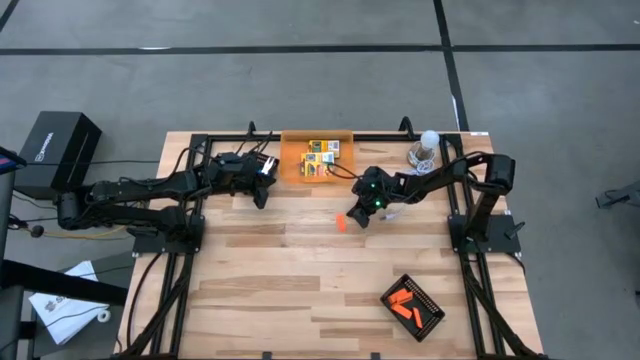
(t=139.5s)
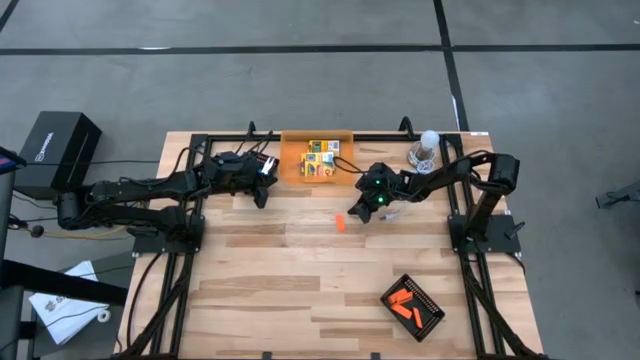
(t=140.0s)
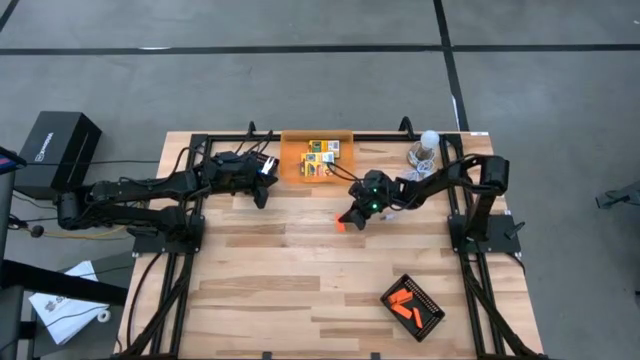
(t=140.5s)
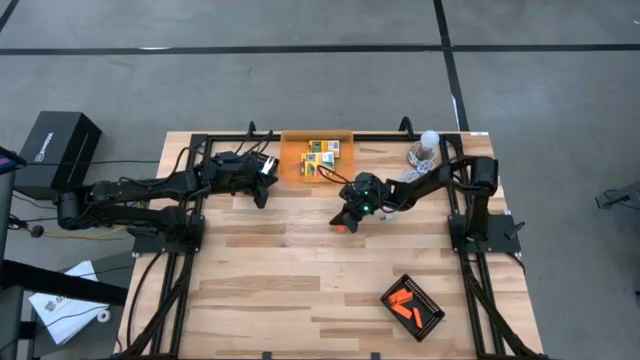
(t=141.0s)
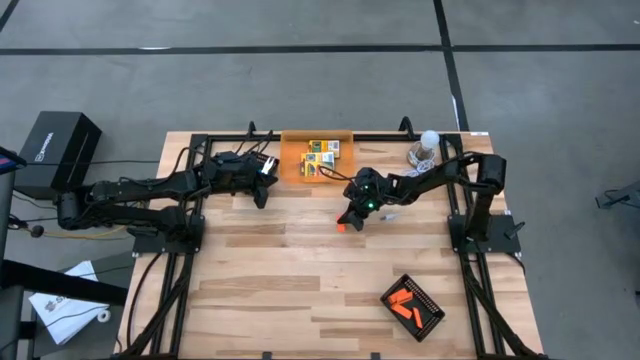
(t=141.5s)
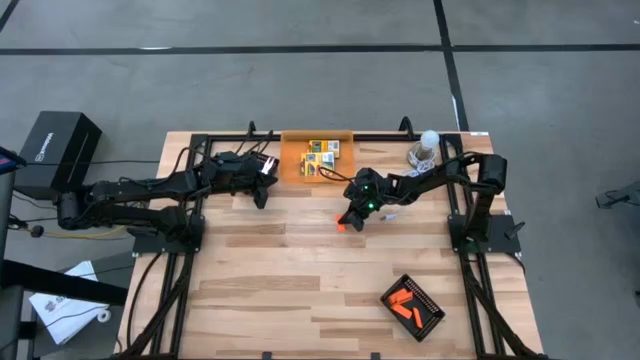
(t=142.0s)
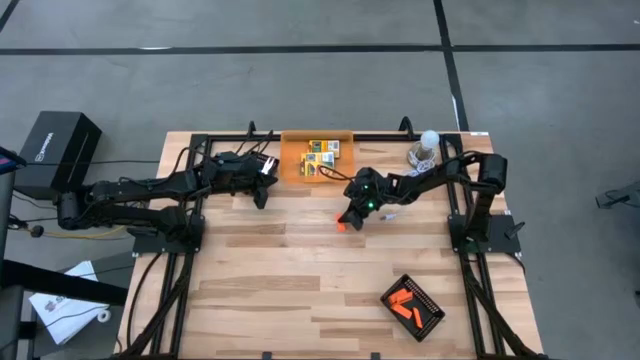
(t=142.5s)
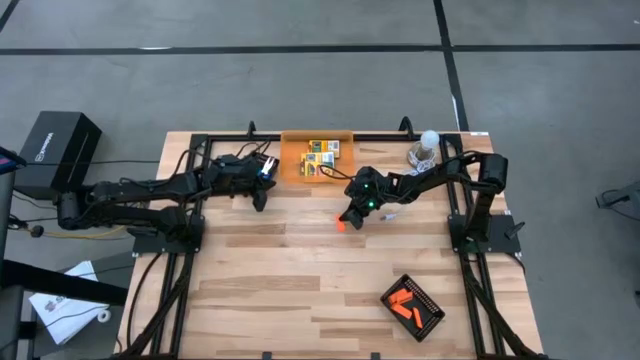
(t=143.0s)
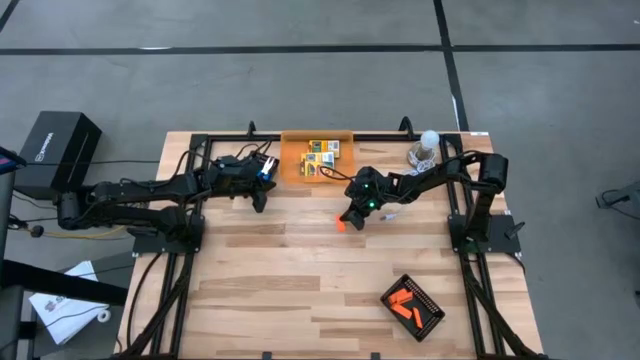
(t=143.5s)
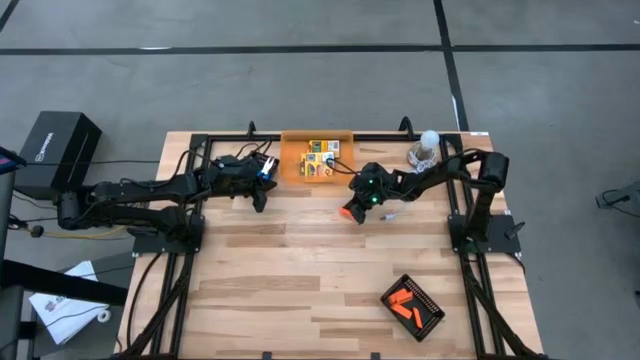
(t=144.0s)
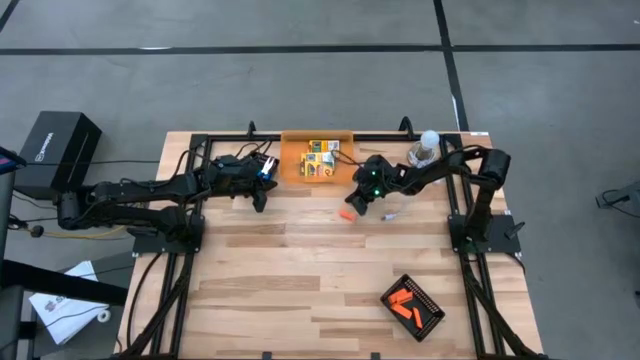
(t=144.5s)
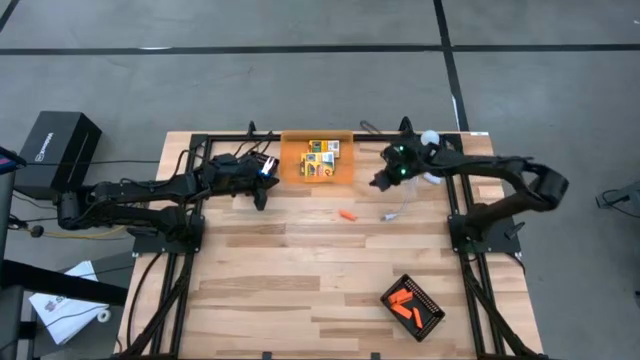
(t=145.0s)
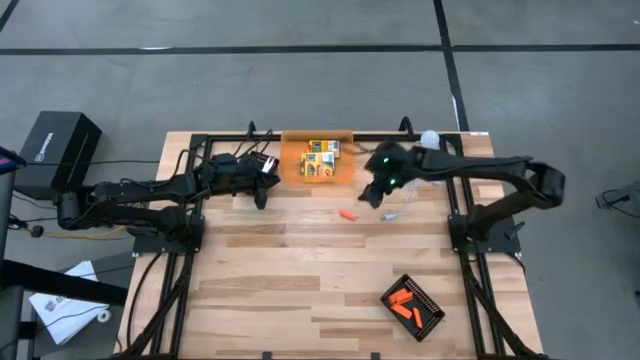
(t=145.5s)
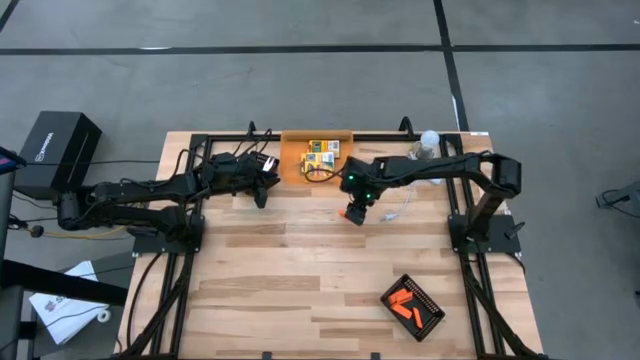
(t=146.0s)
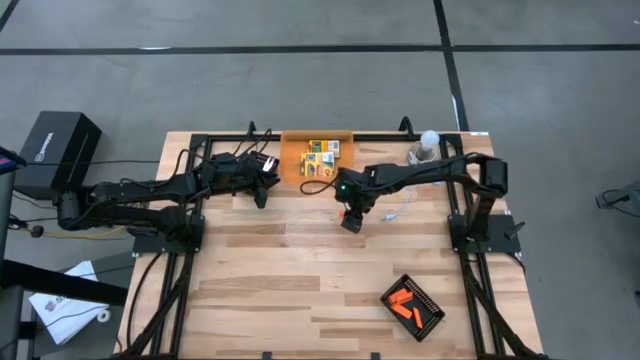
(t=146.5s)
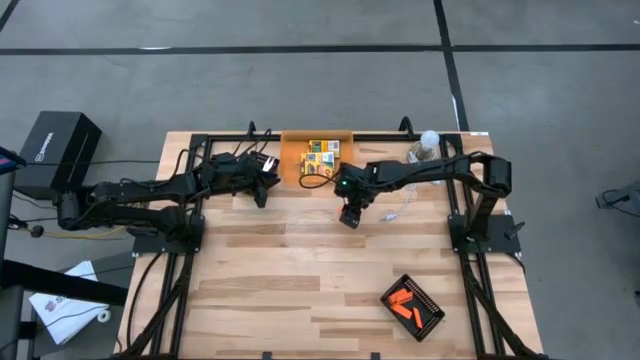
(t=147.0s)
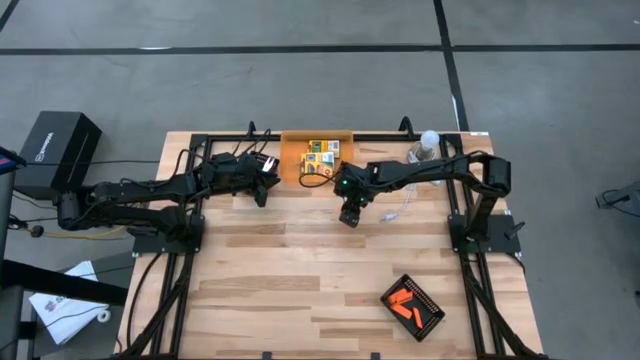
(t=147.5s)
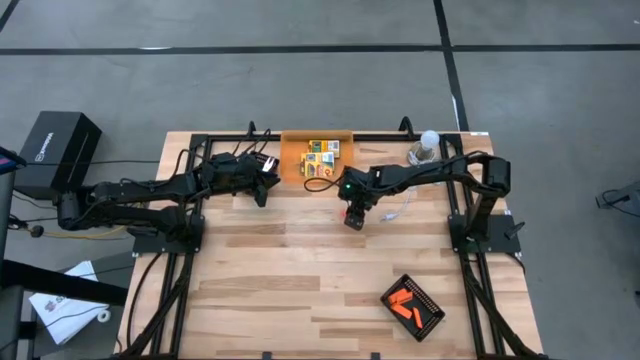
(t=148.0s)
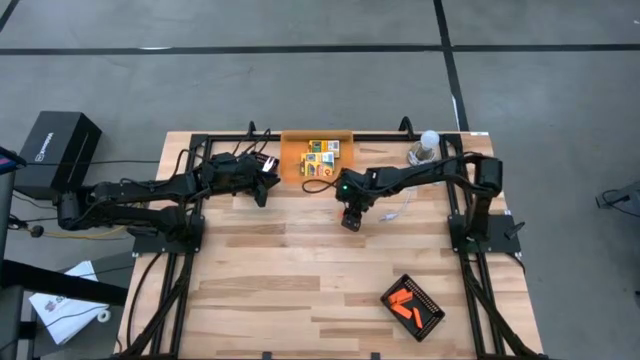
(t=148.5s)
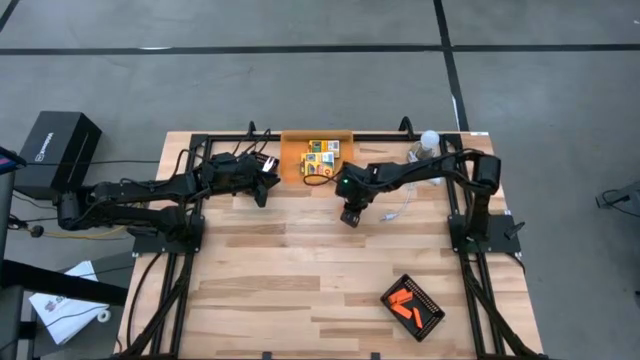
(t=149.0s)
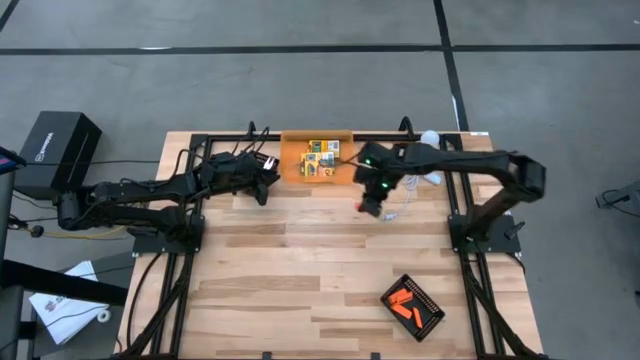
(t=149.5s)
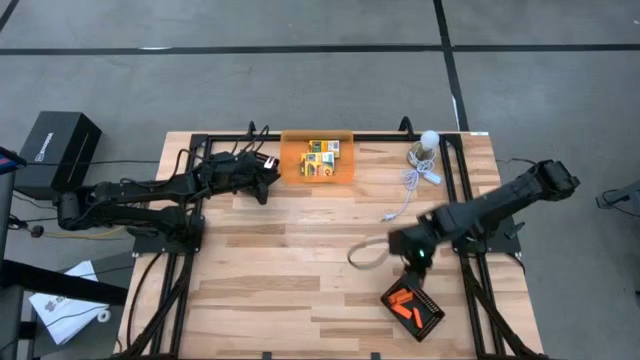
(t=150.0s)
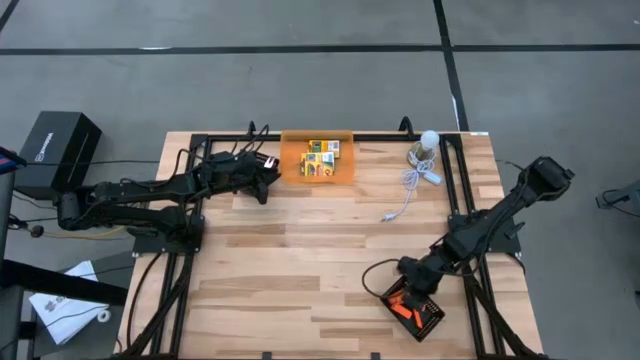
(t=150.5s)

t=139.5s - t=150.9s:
Task: Pick & Place School Supplies
Put the orange eraser into the bottom black bin

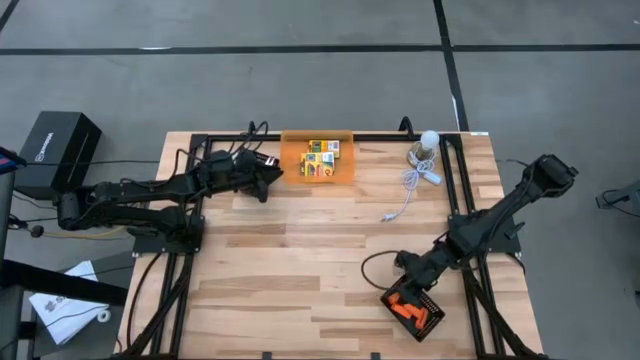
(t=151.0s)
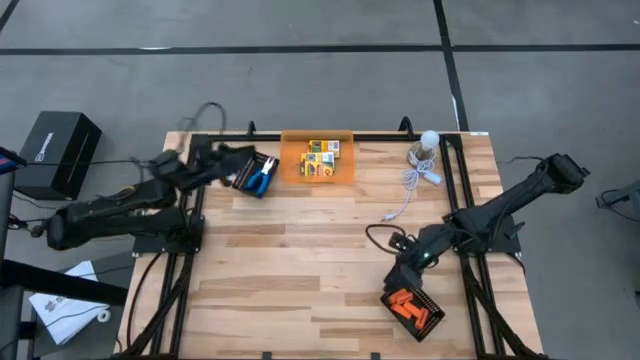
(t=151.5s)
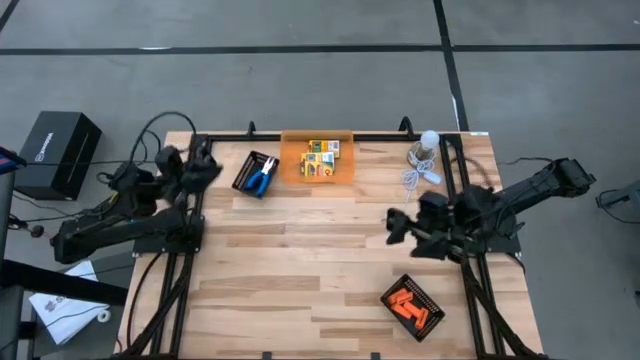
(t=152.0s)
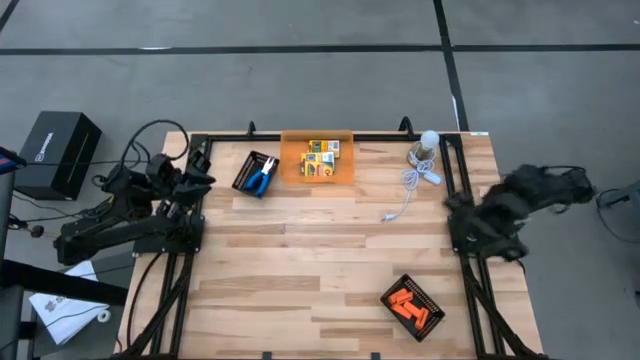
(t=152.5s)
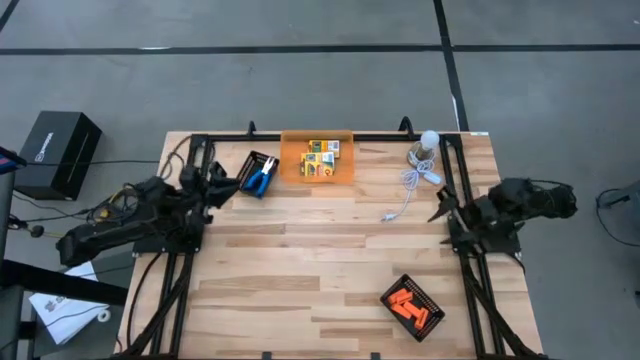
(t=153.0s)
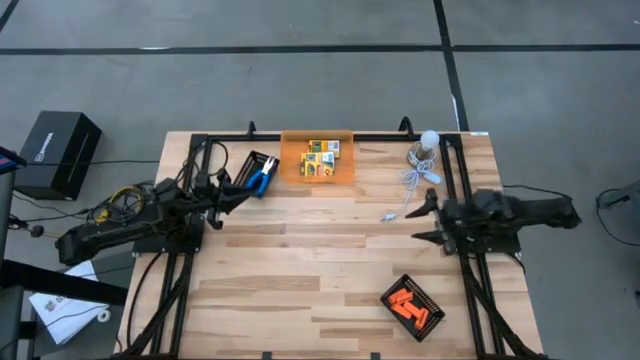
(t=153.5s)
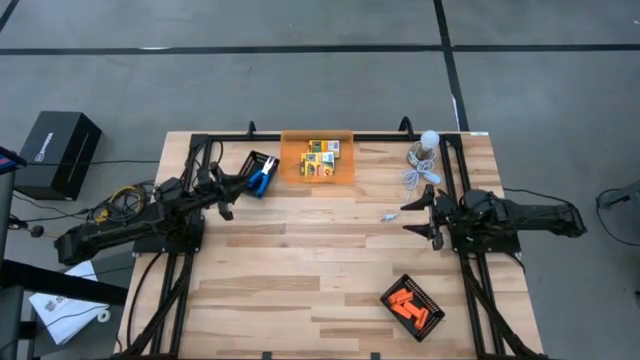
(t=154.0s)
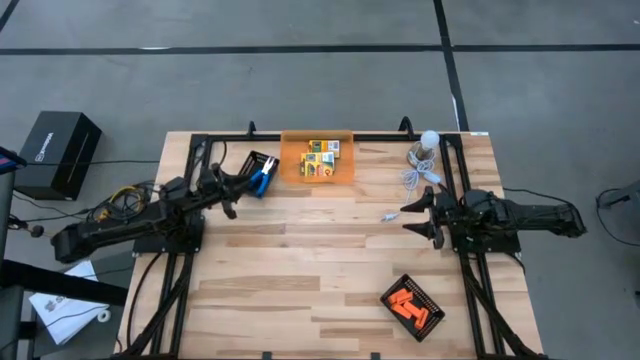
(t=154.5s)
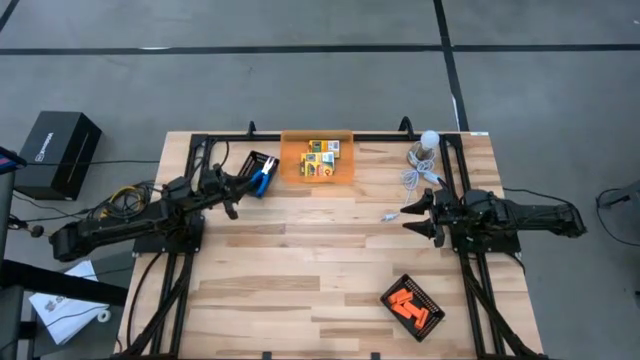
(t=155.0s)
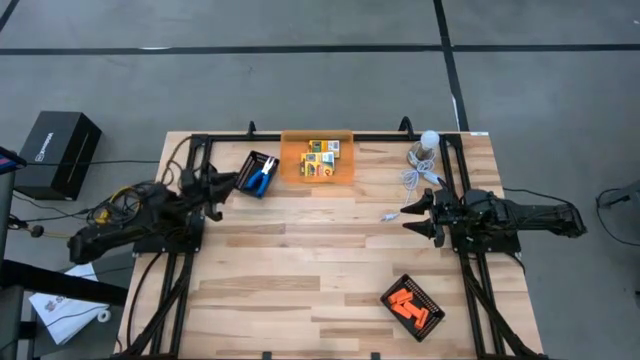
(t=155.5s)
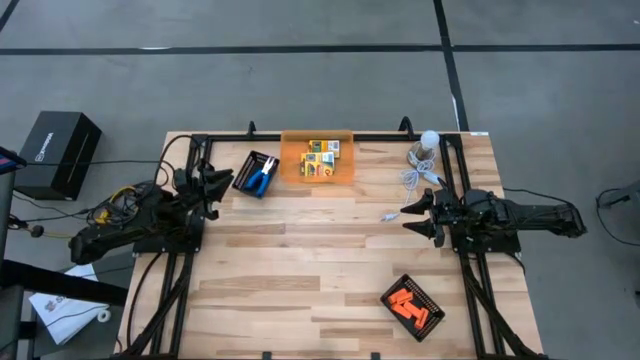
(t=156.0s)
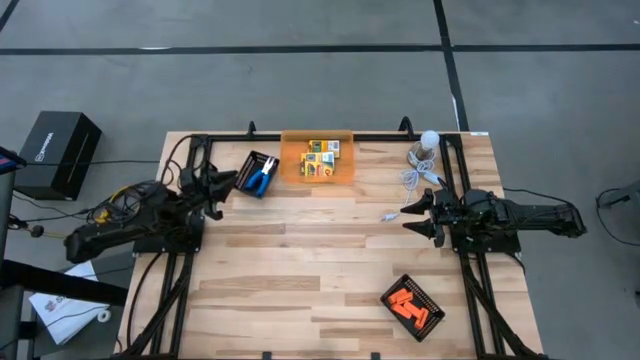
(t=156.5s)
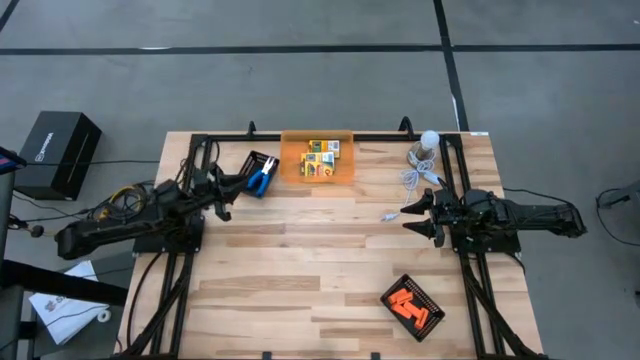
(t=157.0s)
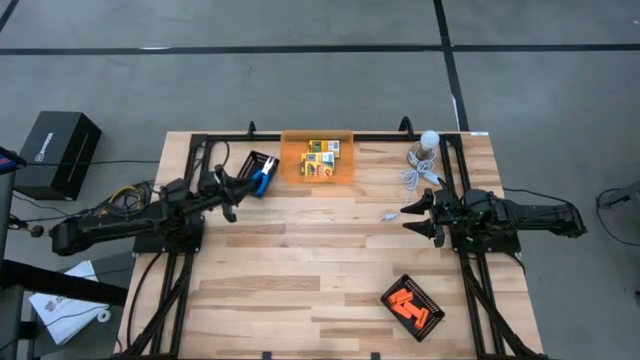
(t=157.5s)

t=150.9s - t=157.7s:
Return to Home Position

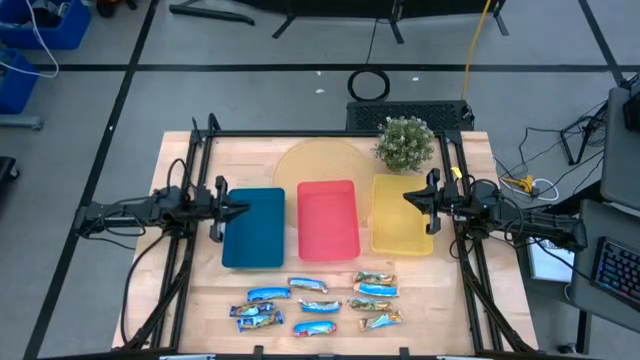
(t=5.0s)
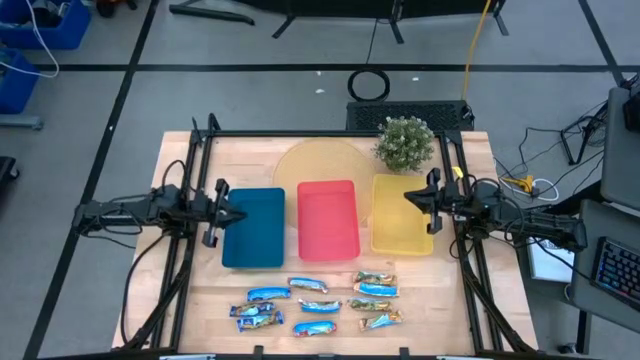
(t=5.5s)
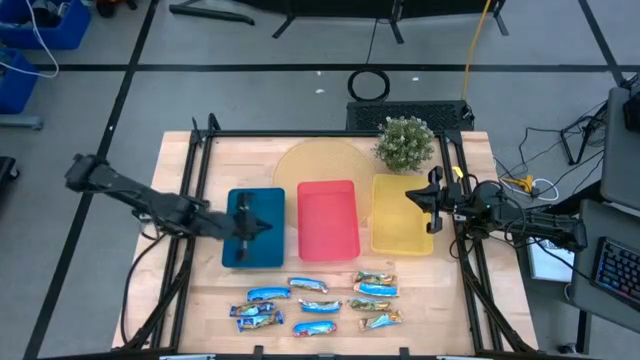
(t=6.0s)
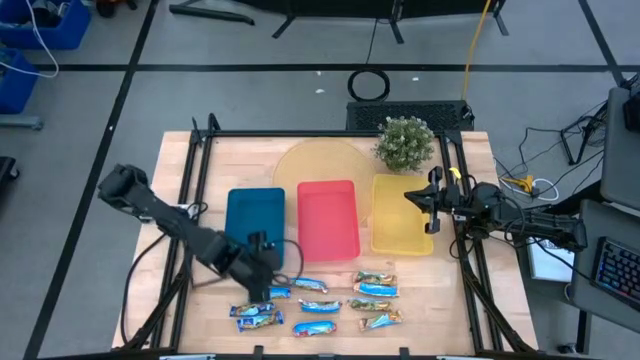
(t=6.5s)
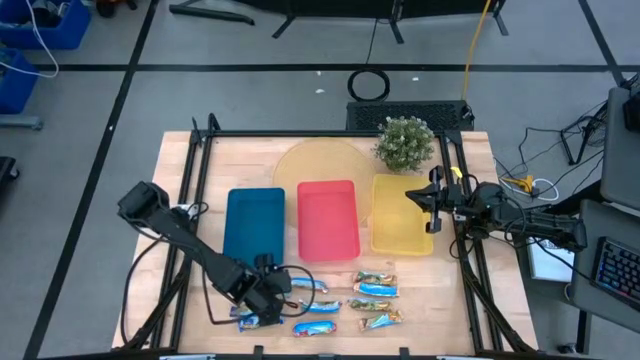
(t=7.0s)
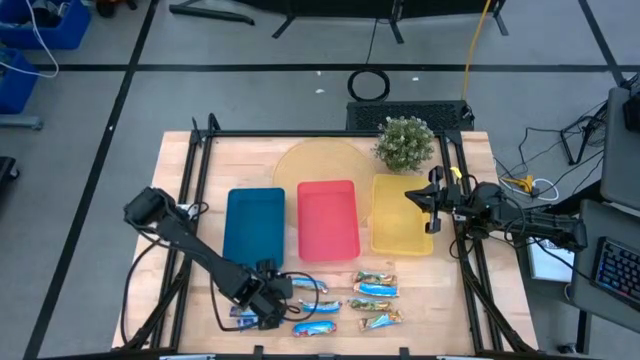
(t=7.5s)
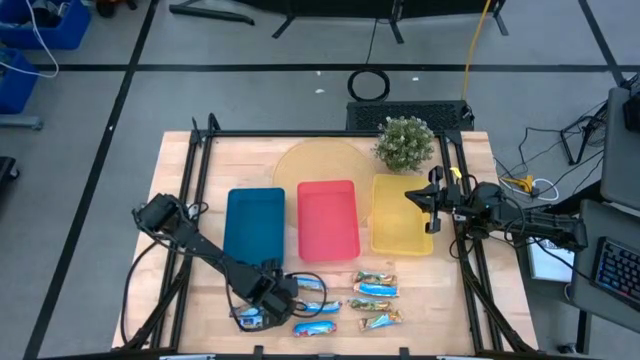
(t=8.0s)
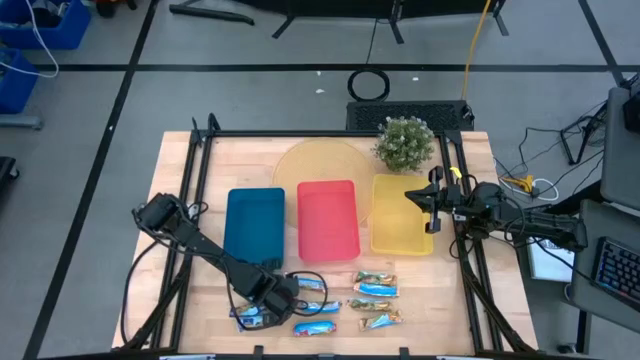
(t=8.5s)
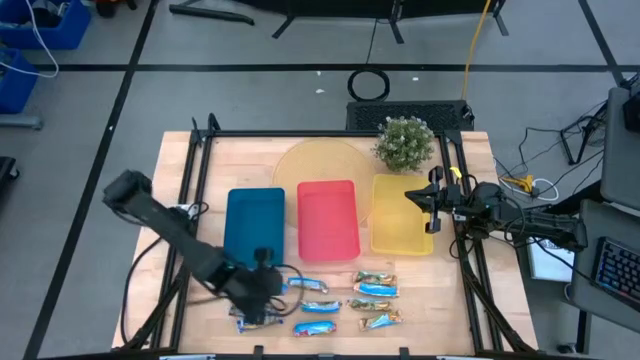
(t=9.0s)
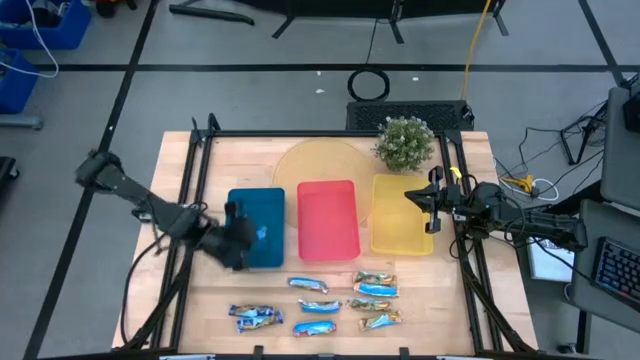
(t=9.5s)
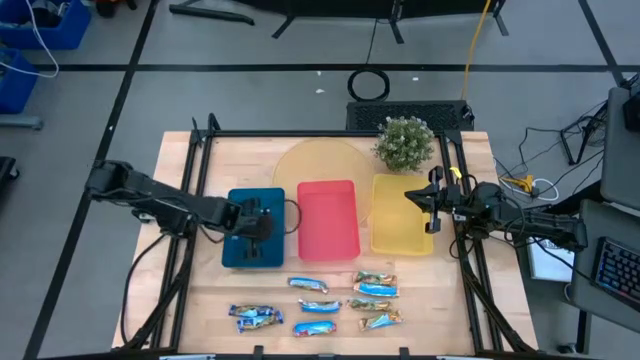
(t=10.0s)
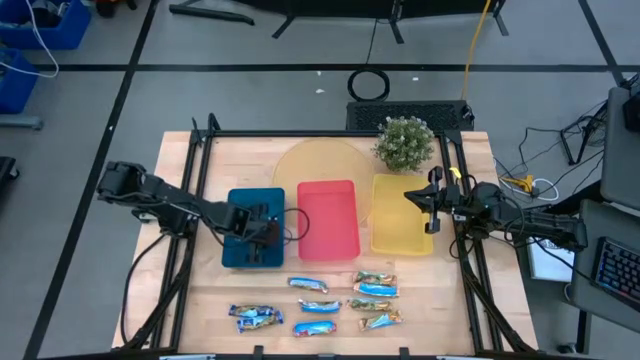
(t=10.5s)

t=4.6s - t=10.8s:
Task: Pick and place Granola Bars by type
Put the blue granola bar into the blue bin
